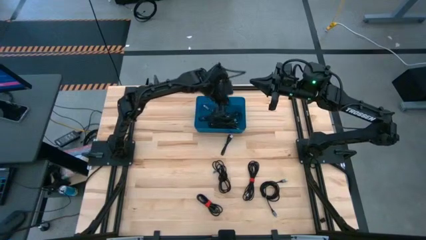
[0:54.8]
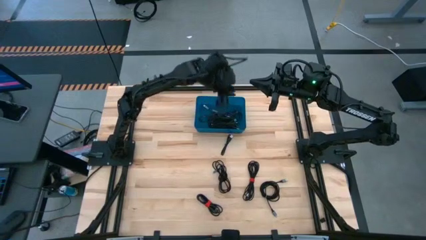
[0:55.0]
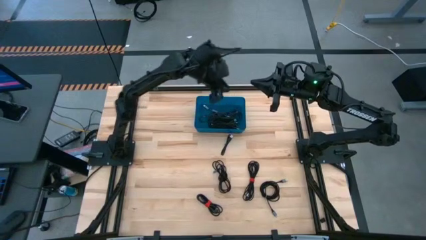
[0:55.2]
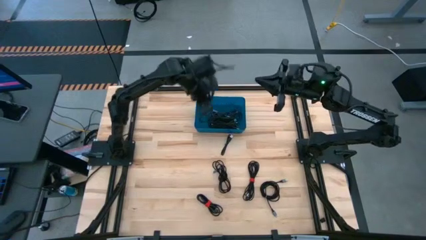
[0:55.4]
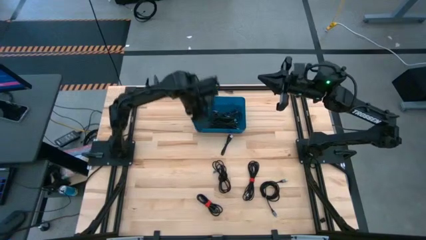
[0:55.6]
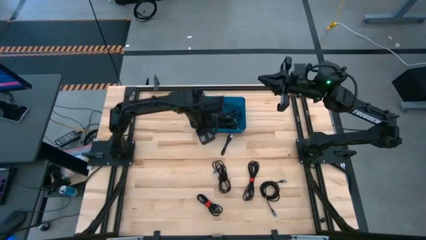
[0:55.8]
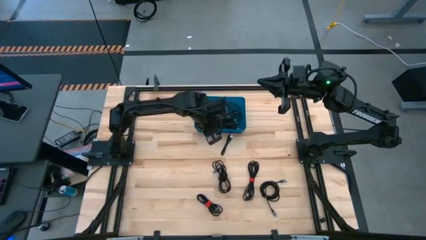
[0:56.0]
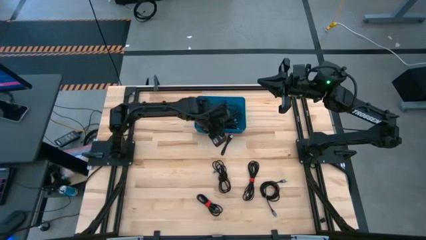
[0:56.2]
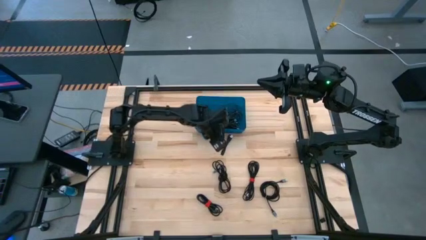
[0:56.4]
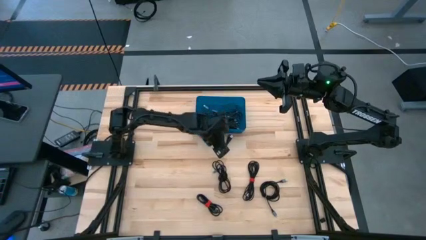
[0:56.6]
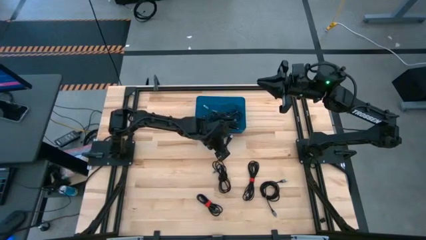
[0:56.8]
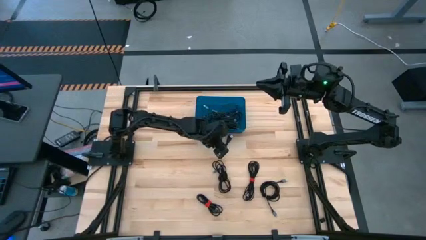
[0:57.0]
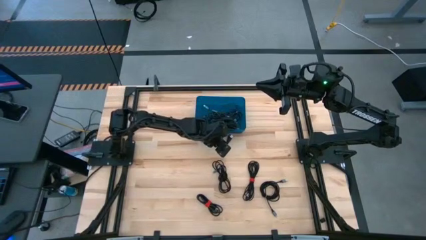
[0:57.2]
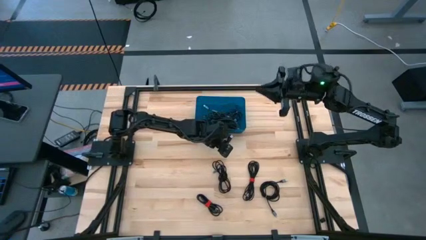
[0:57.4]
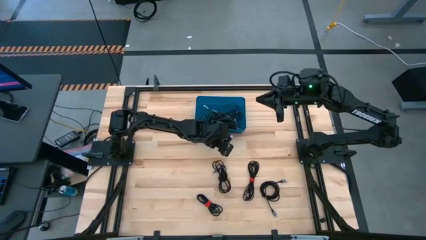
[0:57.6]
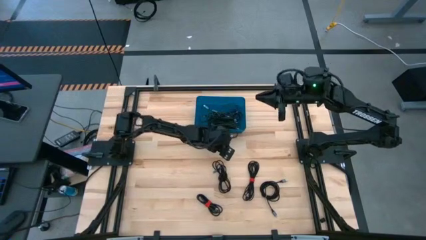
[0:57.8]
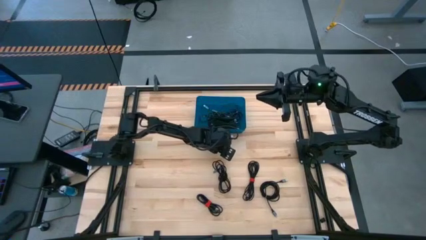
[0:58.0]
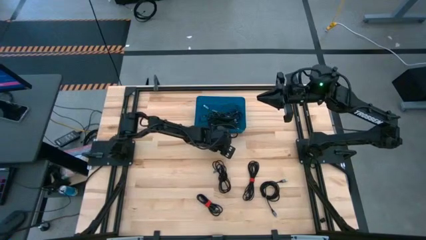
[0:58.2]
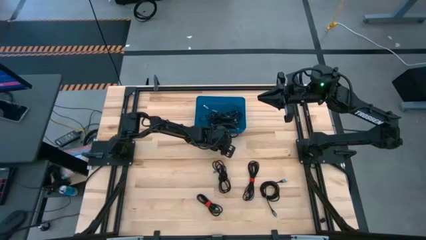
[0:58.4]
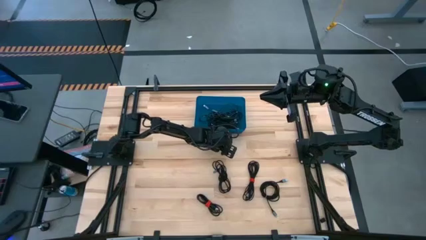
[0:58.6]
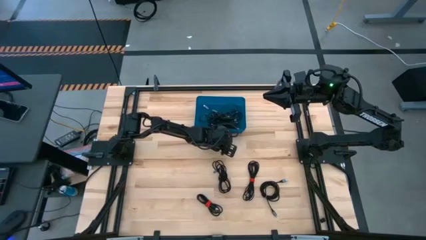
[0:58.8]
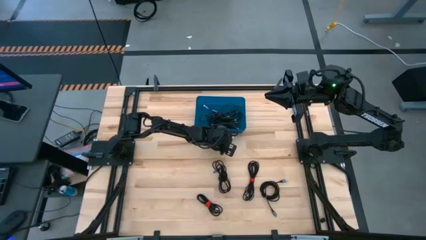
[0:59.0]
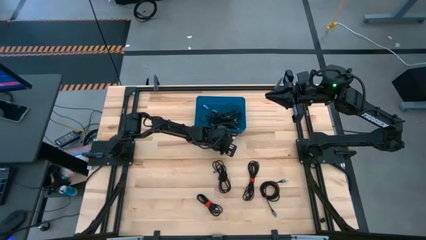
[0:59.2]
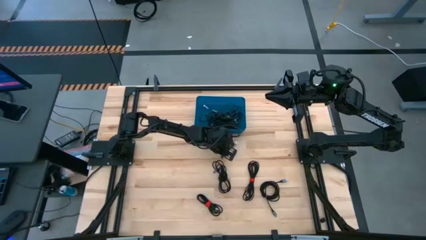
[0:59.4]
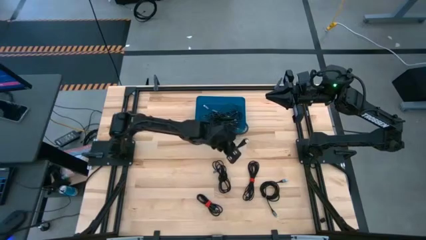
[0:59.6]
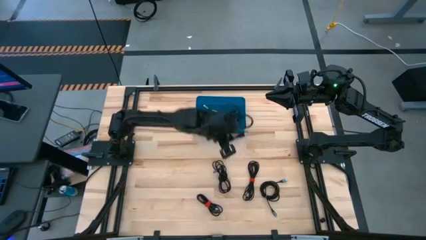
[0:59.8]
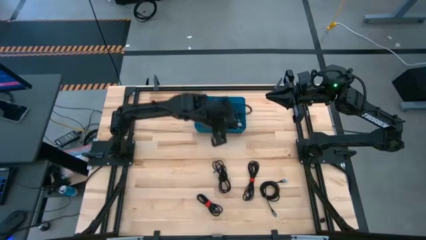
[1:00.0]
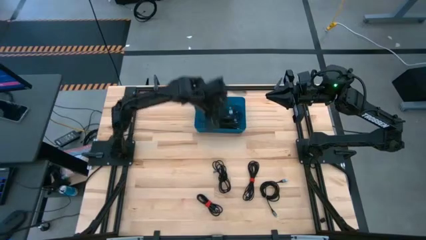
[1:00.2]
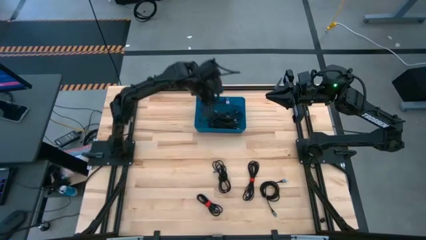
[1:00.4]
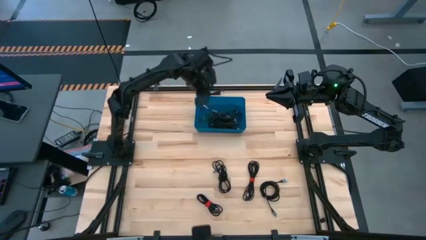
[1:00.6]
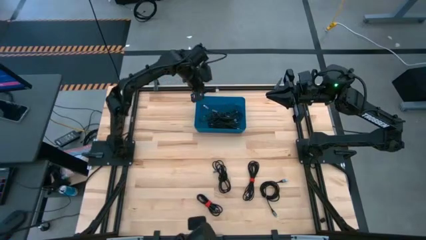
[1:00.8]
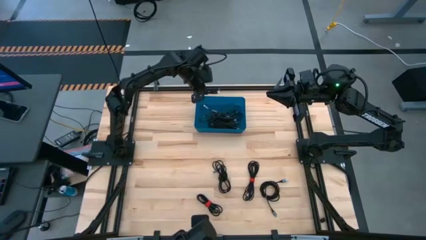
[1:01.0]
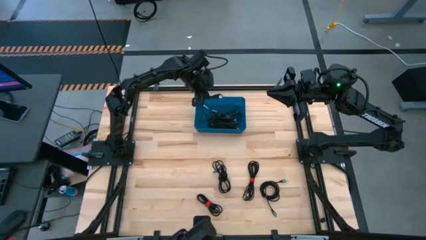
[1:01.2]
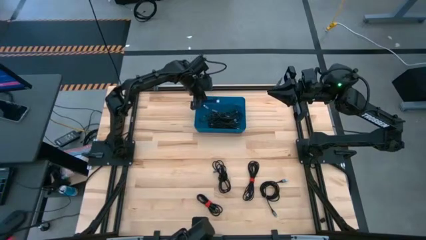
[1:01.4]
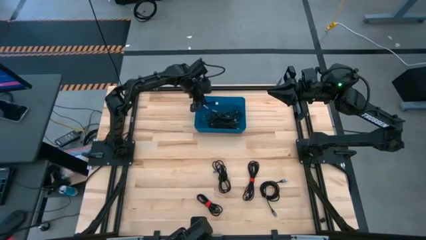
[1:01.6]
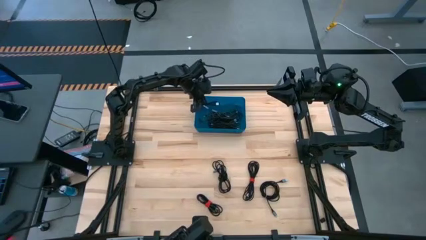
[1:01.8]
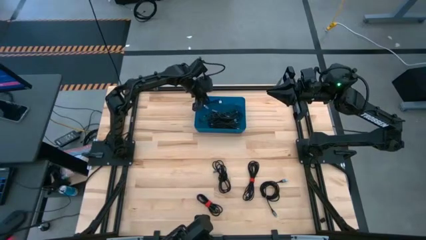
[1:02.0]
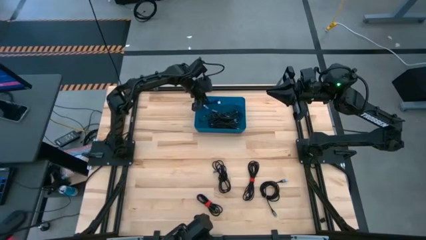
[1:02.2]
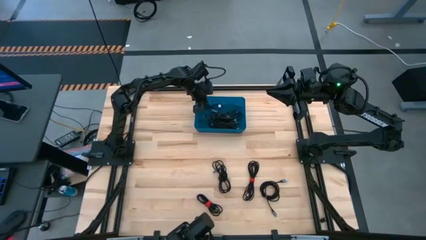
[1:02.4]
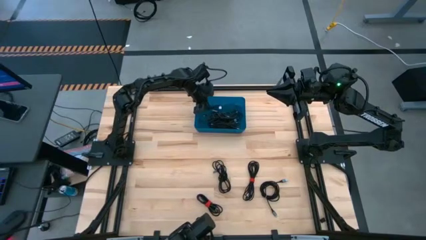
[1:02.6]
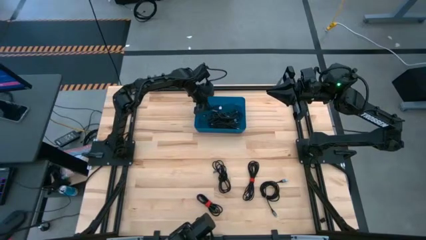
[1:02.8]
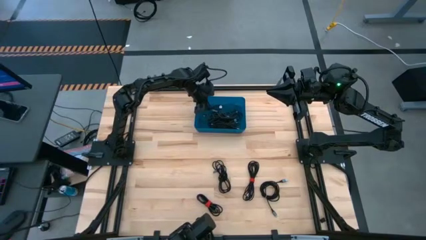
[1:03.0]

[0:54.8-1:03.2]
Task: Pick and place USB-C Cables
Put the black charger cable into the blue bin

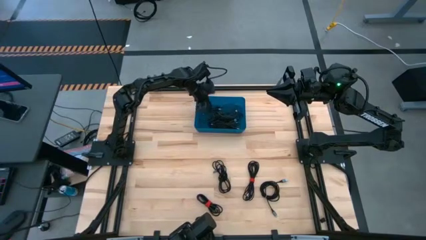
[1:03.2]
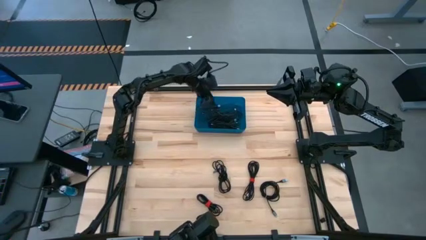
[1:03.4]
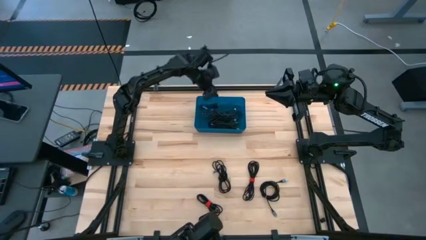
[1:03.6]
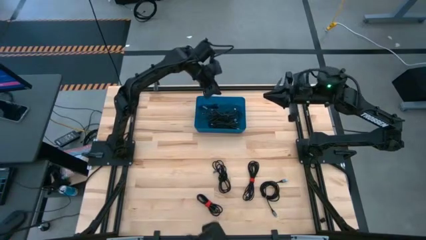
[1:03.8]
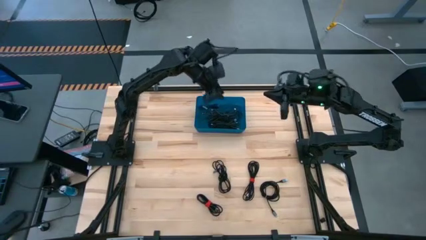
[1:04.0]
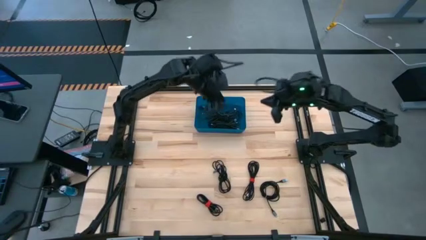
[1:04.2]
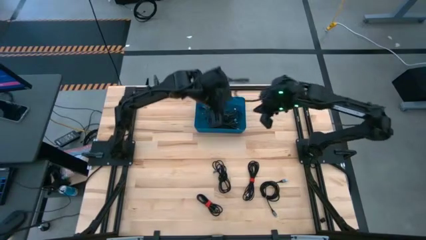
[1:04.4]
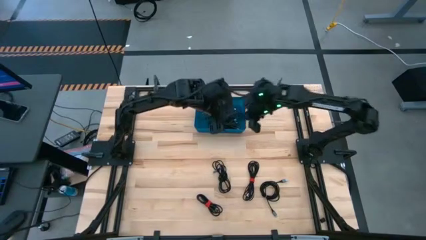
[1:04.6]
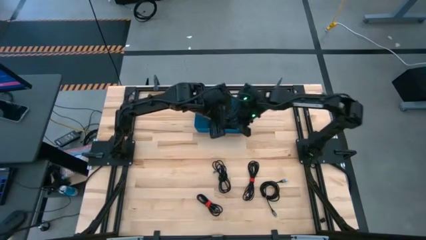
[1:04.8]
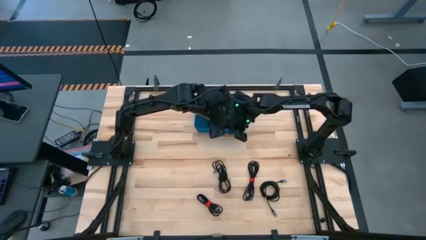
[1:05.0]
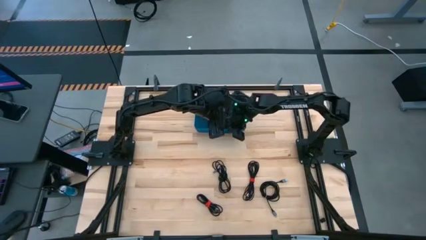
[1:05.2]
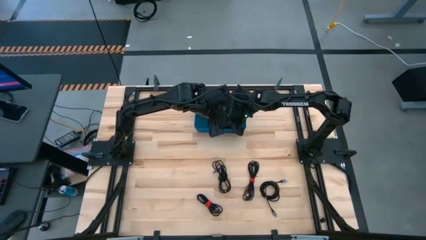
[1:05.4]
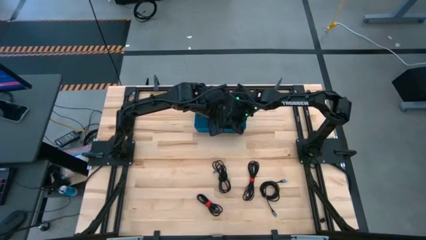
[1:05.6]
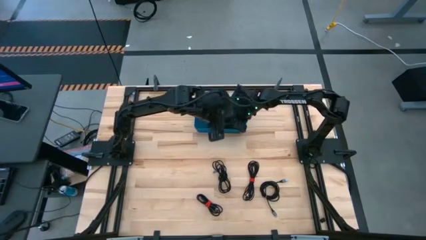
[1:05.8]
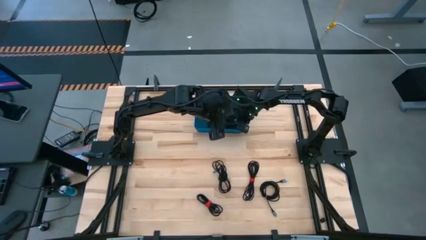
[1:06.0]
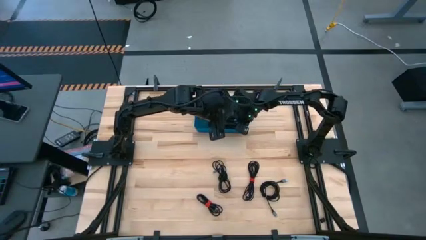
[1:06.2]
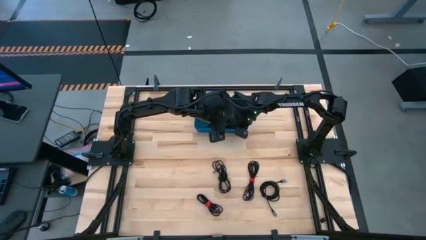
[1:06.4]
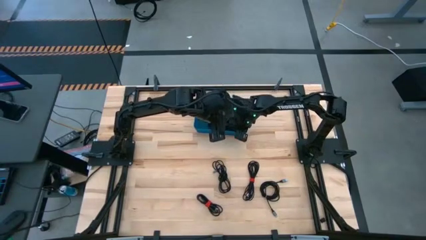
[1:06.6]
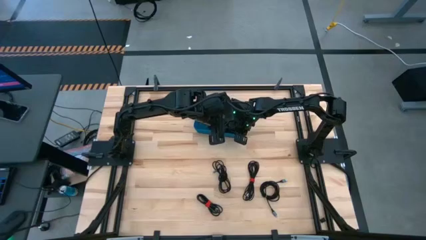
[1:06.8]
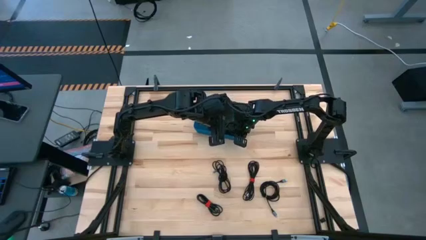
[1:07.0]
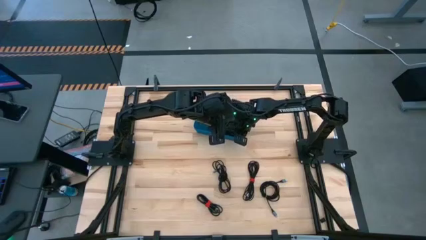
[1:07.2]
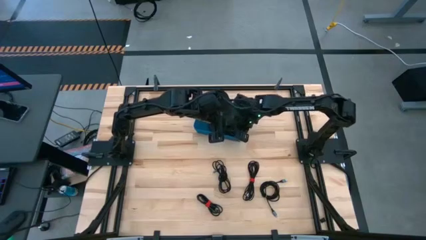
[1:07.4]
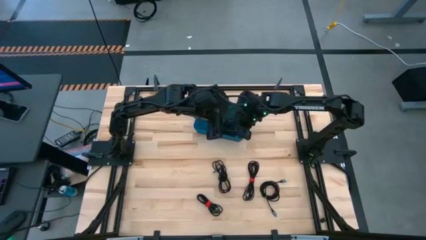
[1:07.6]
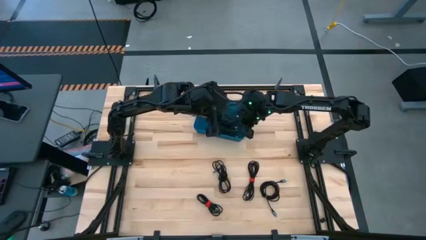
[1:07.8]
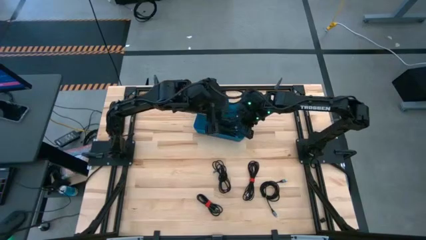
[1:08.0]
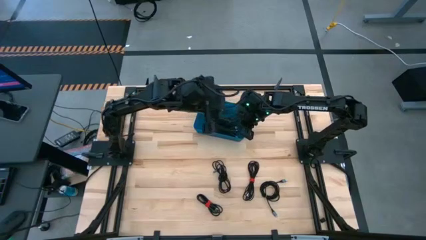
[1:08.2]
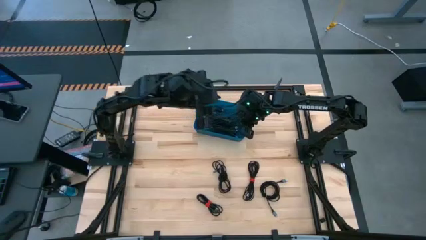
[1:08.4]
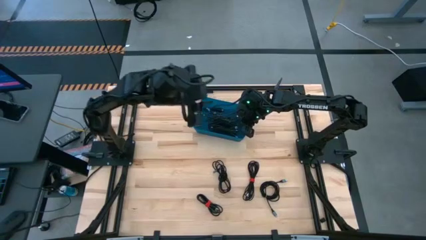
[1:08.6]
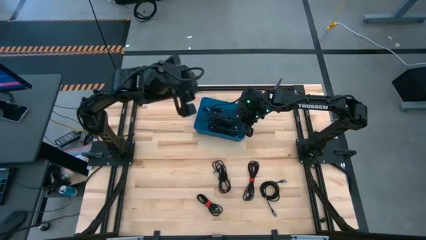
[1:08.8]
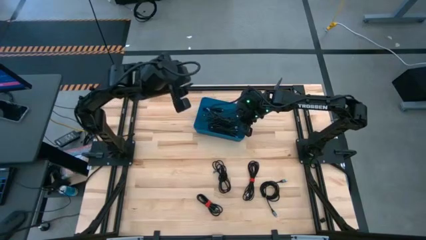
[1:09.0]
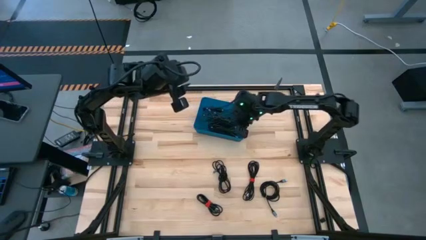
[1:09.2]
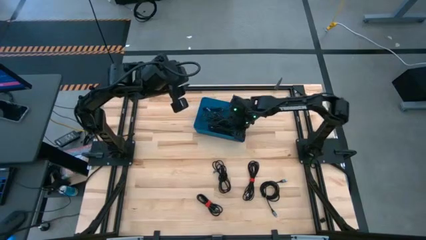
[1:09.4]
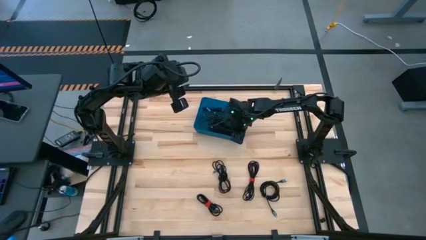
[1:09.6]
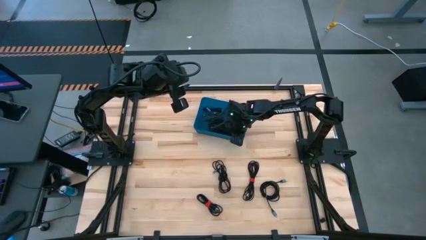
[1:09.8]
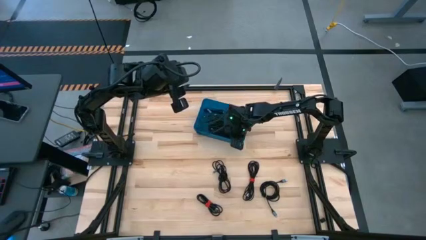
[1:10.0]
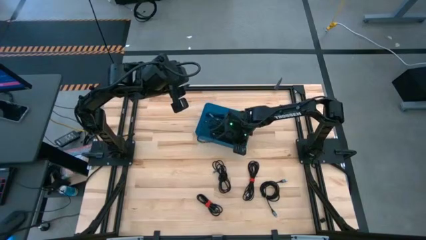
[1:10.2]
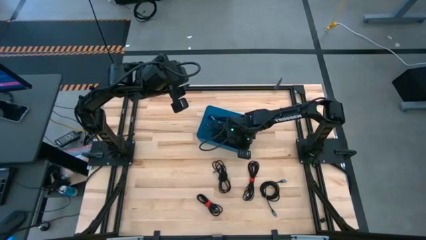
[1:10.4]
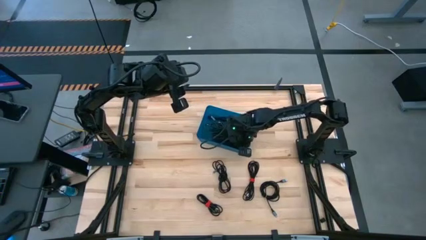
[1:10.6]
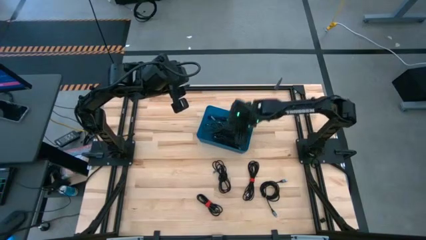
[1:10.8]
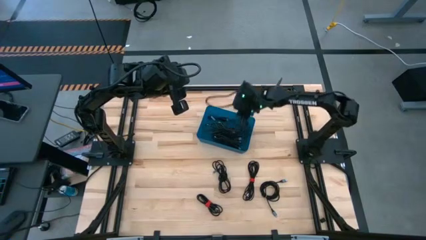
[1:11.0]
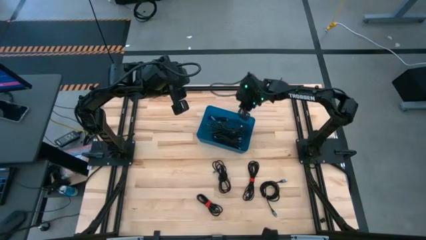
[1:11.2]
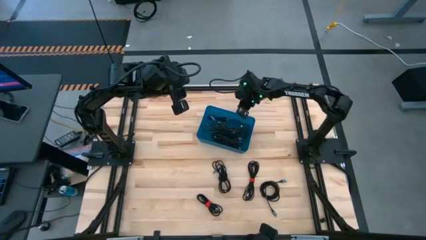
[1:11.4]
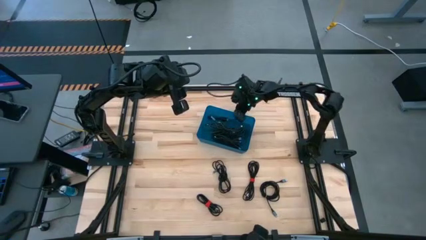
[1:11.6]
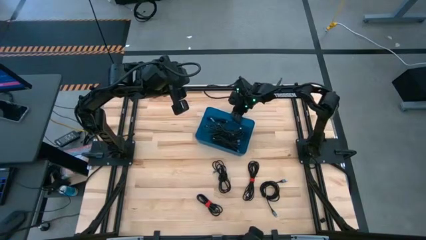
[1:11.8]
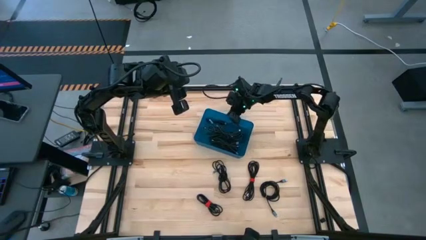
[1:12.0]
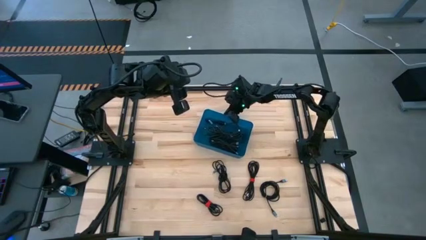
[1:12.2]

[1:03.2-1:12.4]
Adjust the blue bin
